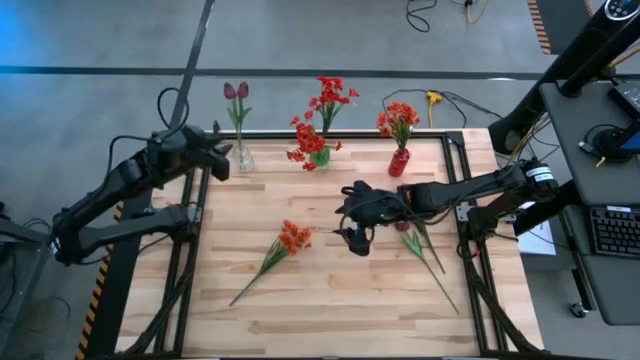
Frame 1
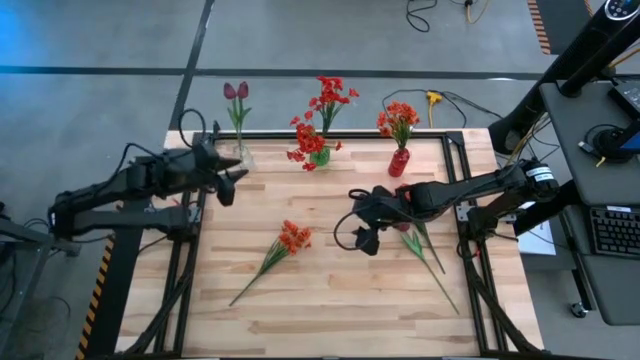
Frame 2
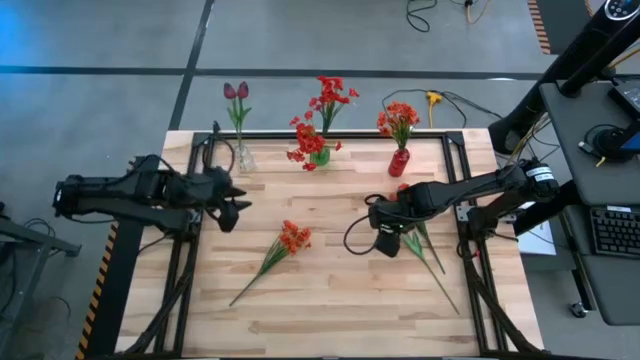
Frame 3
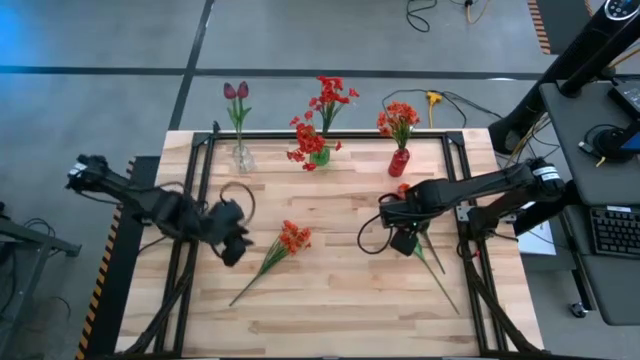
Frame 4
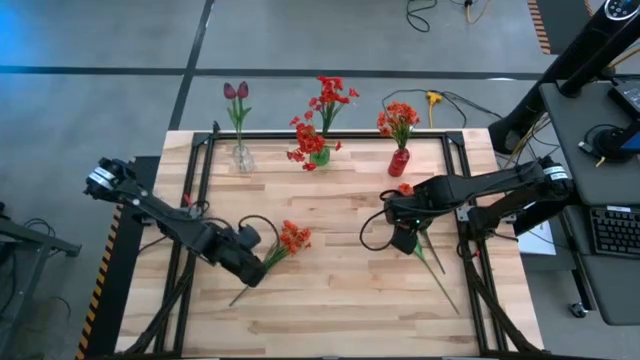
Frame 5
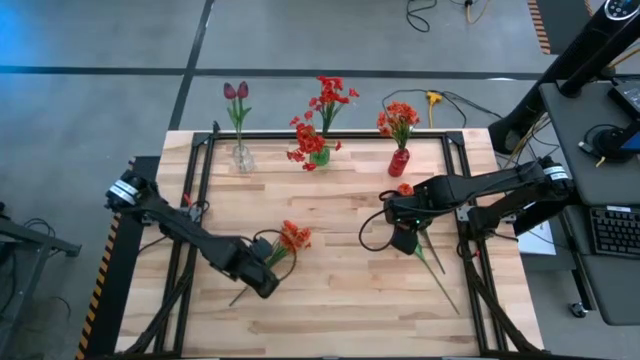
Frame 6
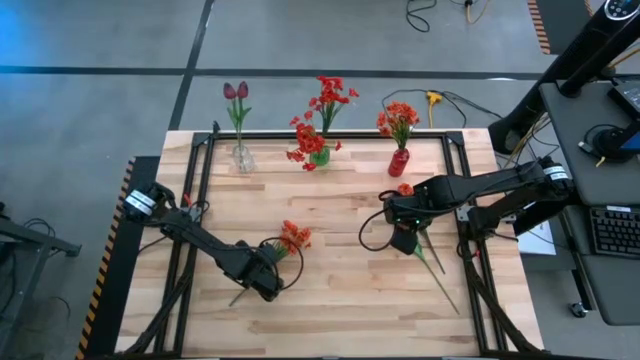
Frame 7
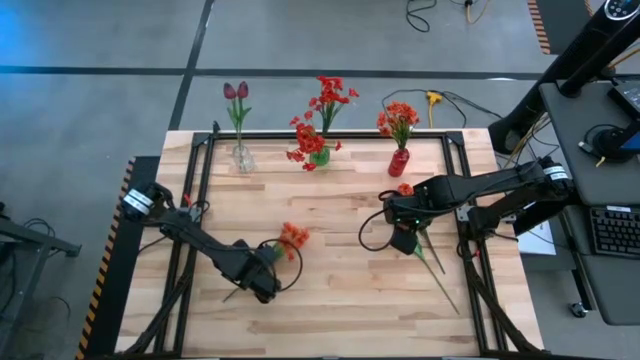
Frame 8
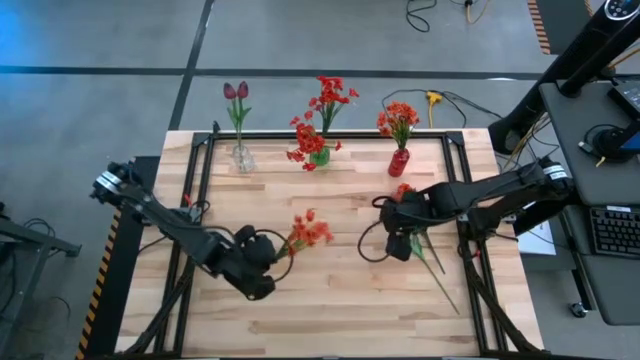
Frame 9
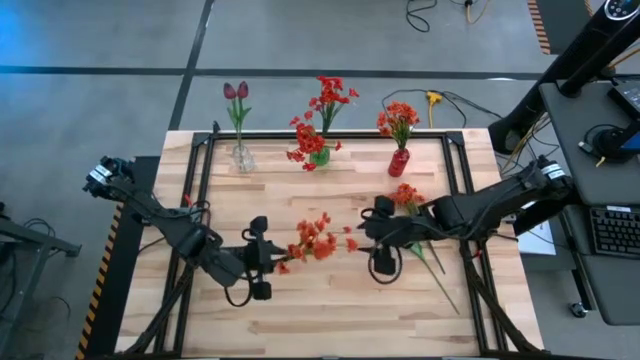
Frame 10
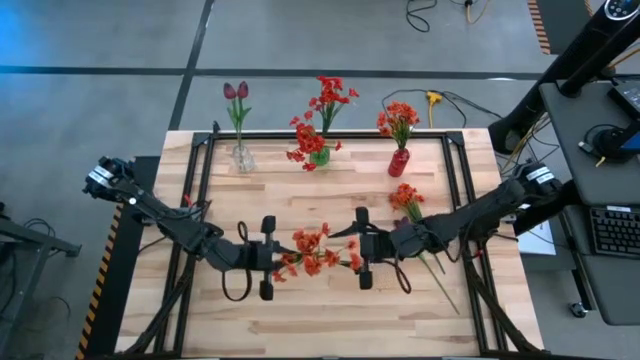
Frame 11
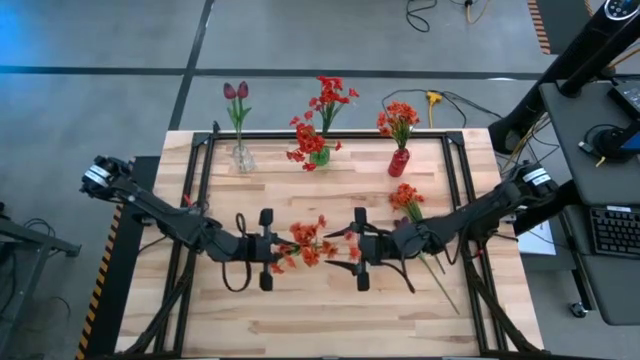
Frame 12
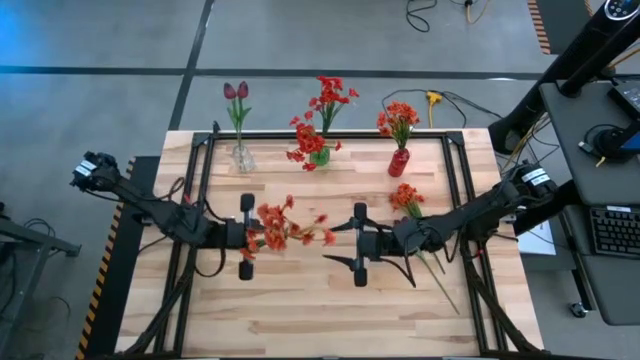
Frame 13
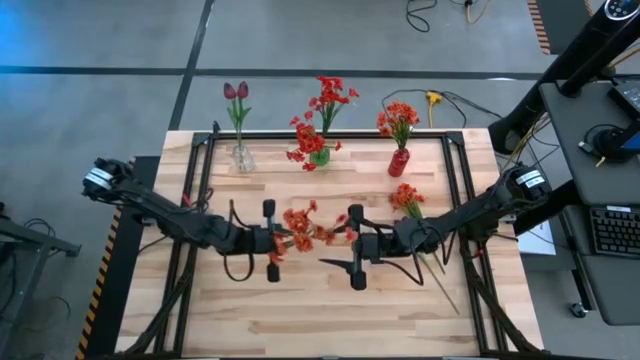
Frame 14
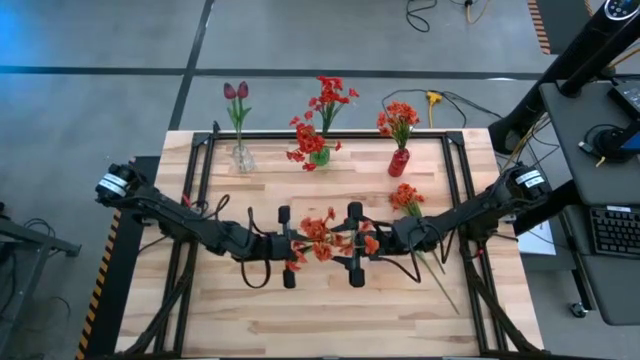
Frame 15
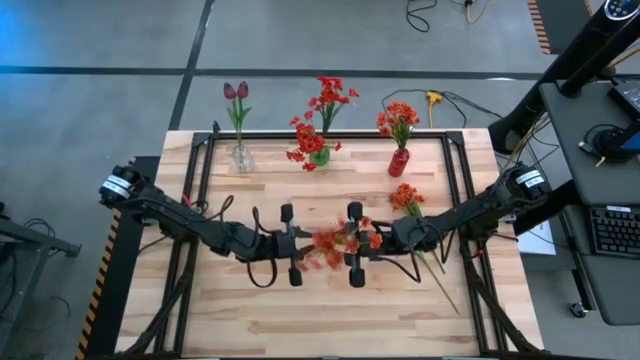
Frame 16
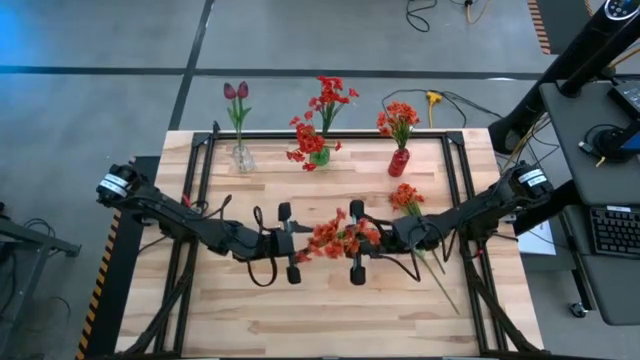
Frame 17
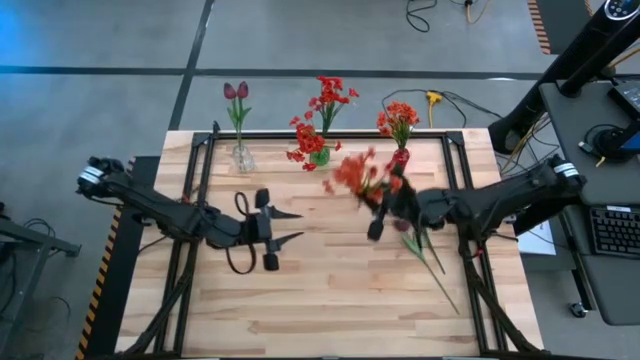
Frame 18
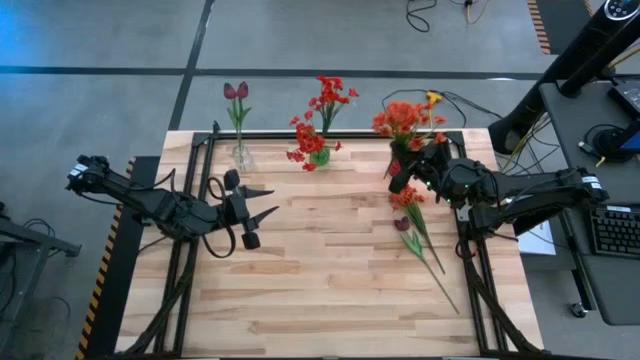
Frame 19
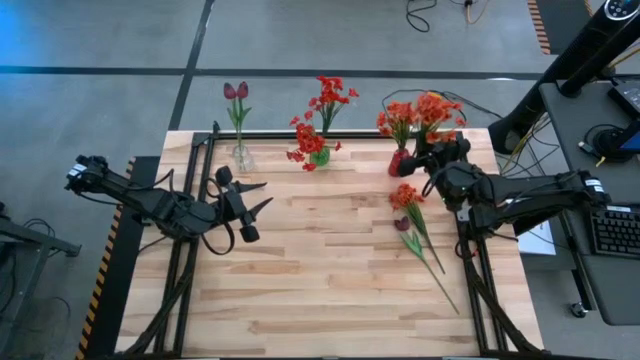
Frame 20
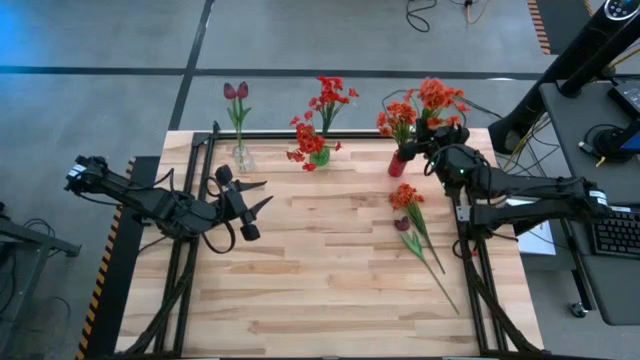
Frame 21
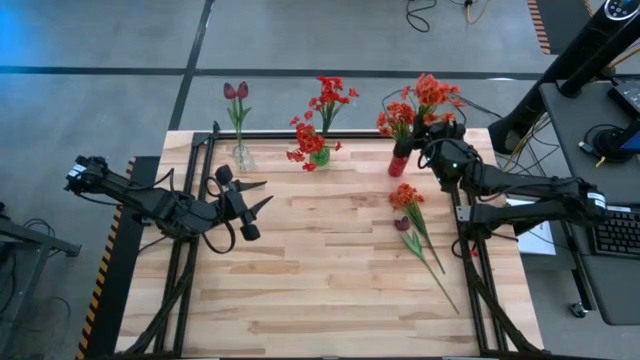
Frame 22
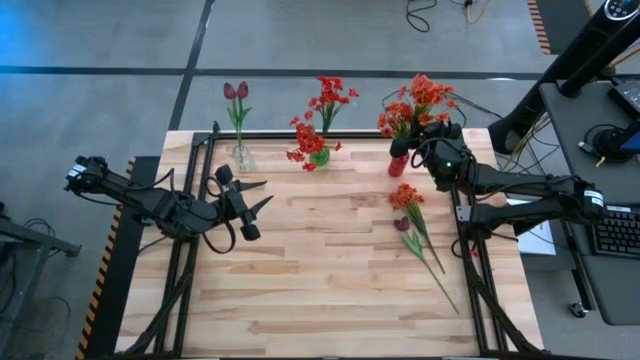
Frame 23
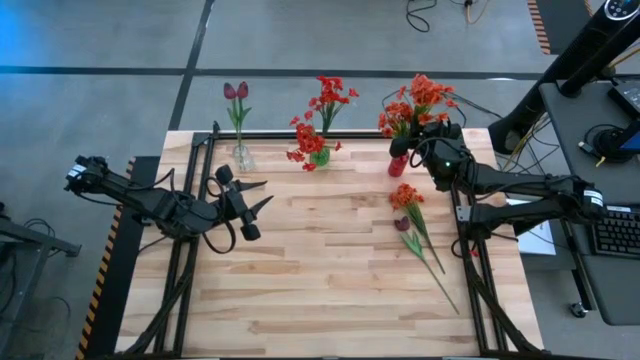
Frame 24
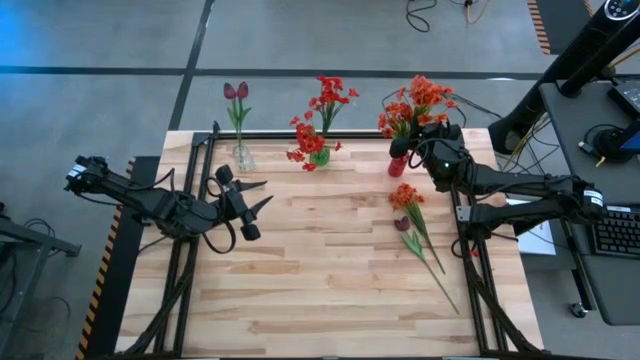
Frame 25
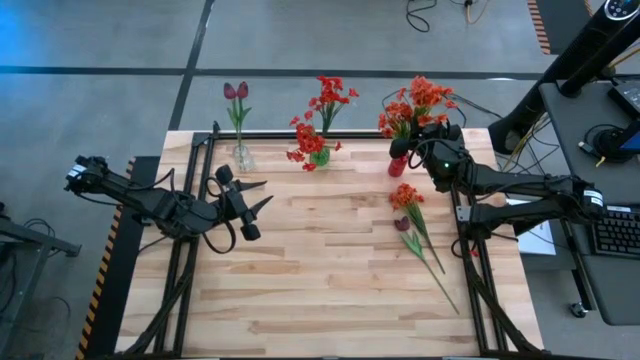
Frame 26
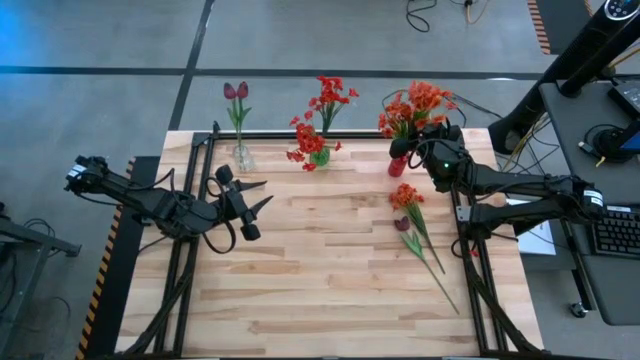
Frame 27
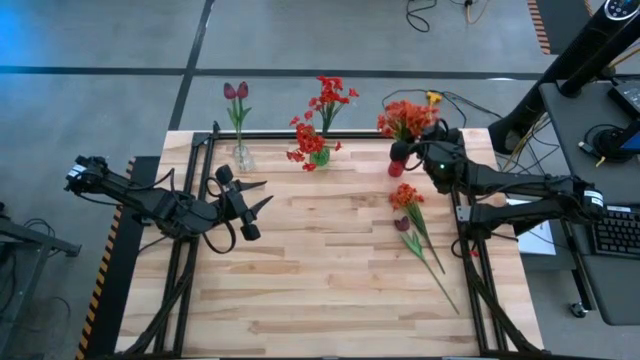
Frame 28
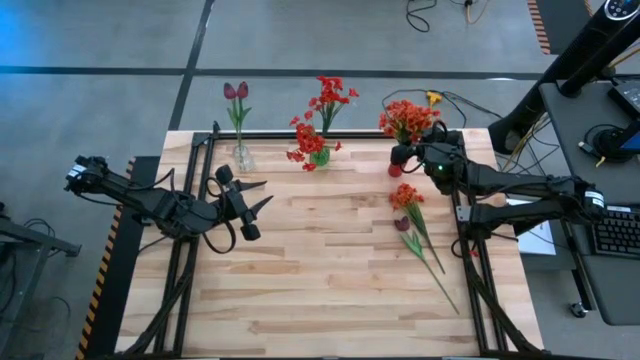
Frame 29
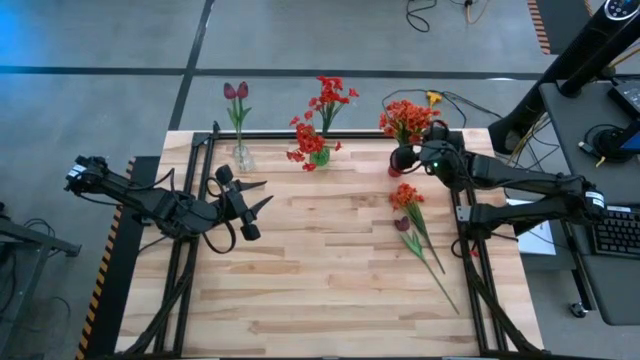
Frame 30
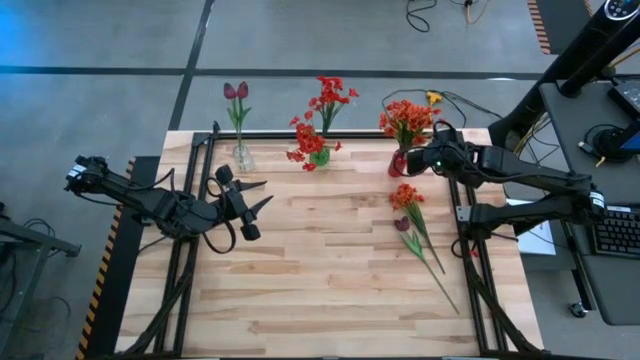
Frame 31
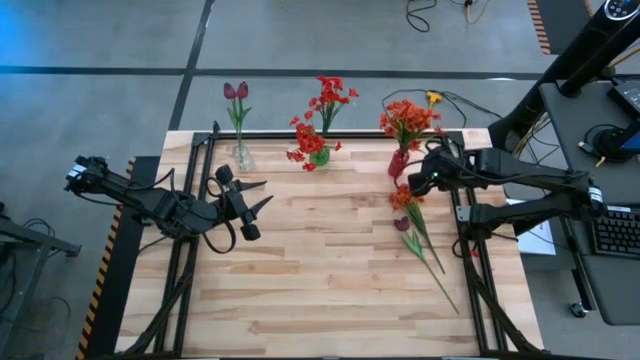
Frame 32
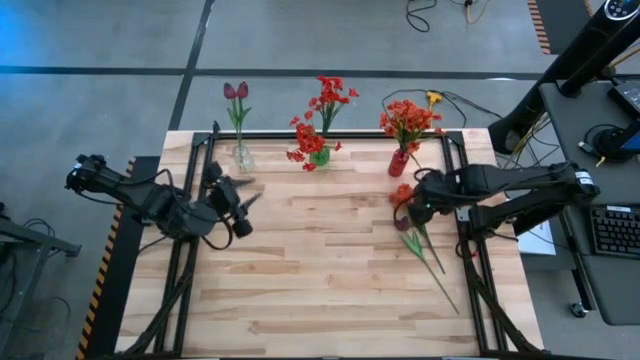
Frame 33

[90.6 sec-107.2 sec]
Task: Sort flowers into vase by color
Put the left orange flower into the red vase
